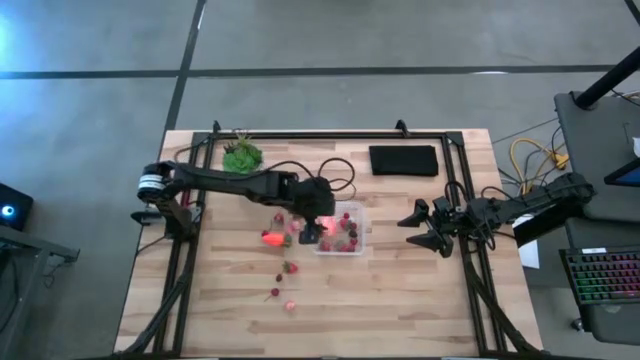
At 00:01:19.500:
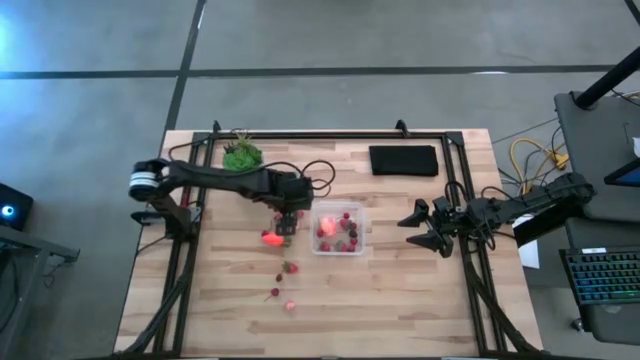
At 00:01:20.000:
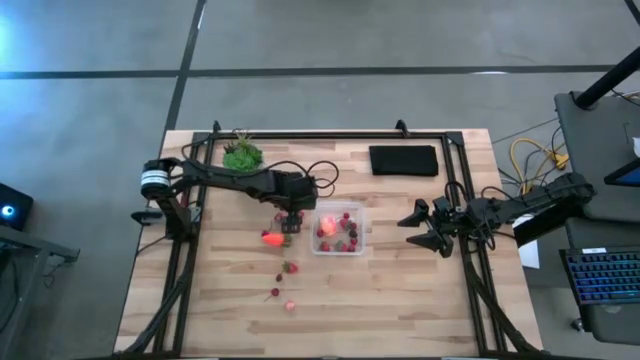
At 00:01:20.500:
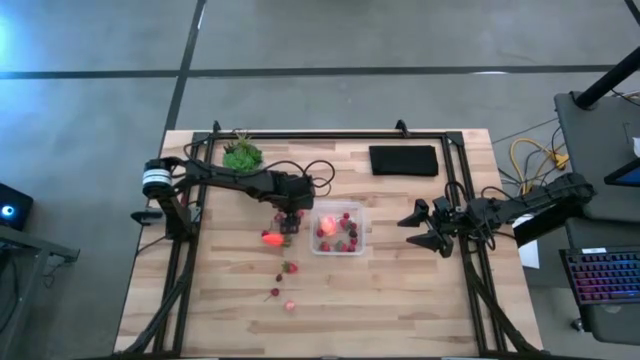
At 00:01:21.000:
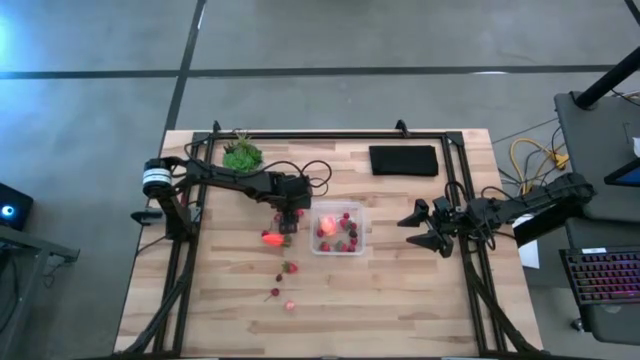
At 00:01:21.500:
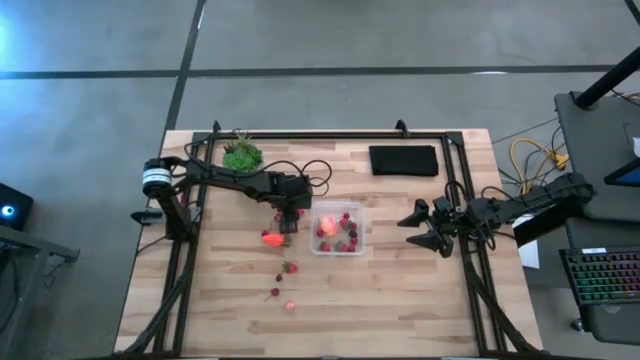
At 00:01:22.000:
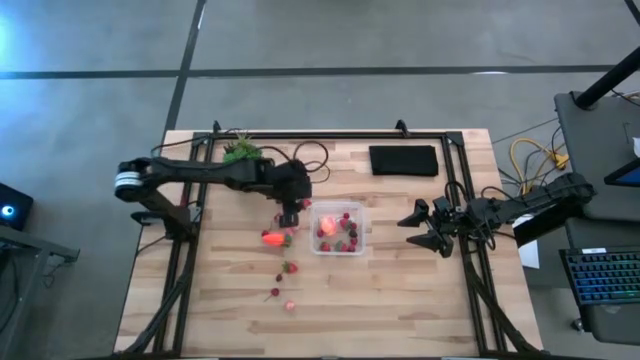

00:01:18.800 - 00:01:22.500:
Task: Pick and placing Produce into tupperware
Put the strawberry into the transparent container

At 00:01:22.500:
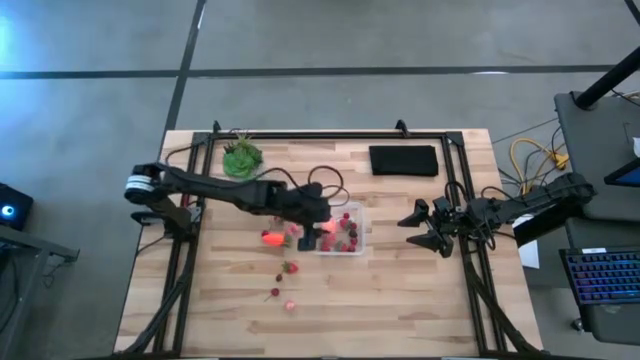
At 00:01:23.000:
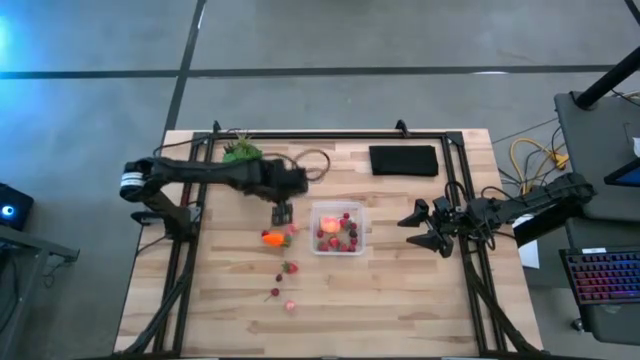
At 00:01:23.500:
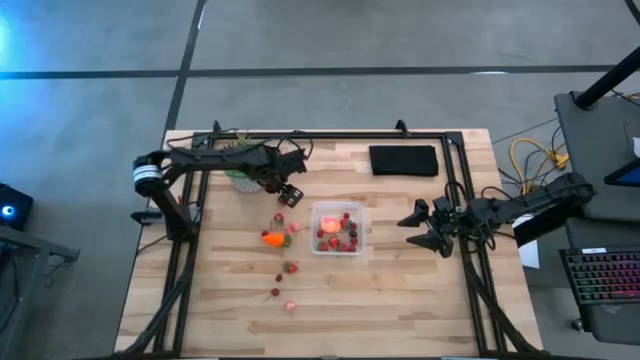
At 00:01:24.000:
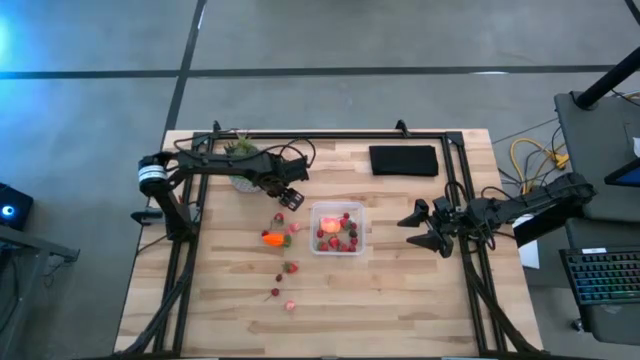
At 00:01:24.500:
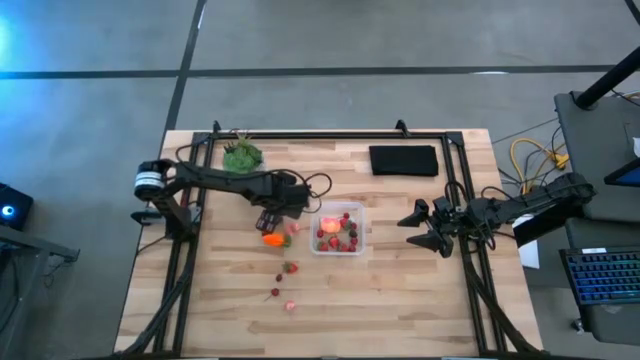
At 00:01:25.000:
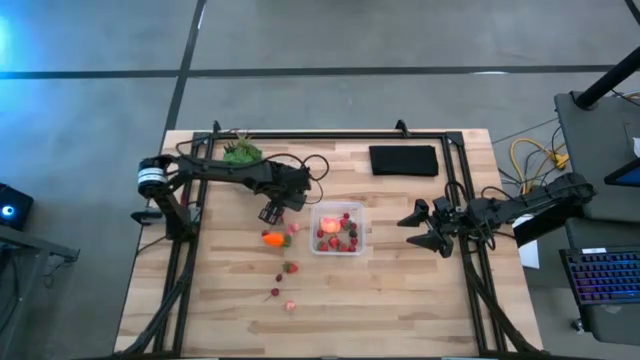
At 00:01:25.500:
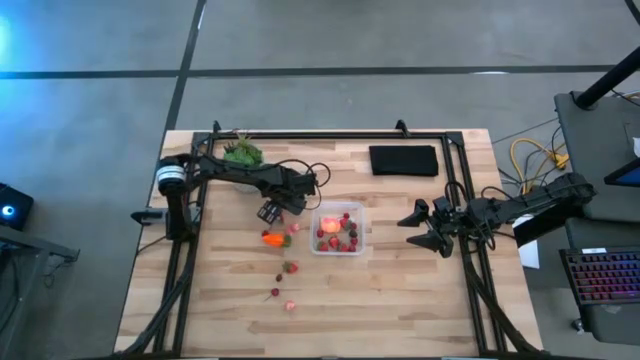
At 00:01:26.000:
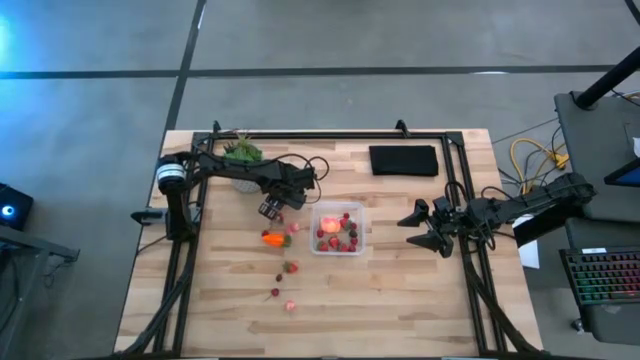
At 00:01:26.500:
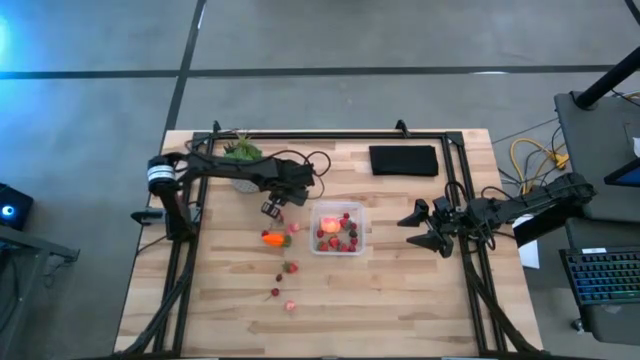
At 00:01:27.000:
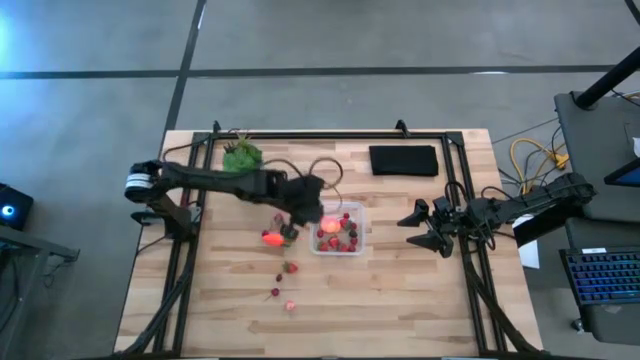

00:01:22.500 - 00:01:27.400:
Put the strawberry into the transparent container

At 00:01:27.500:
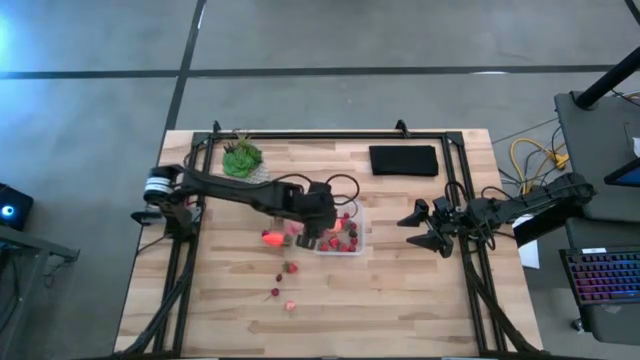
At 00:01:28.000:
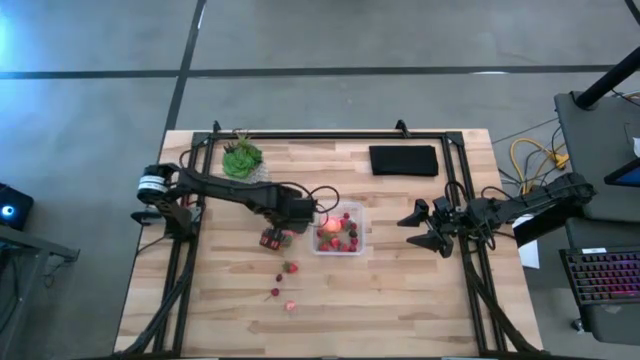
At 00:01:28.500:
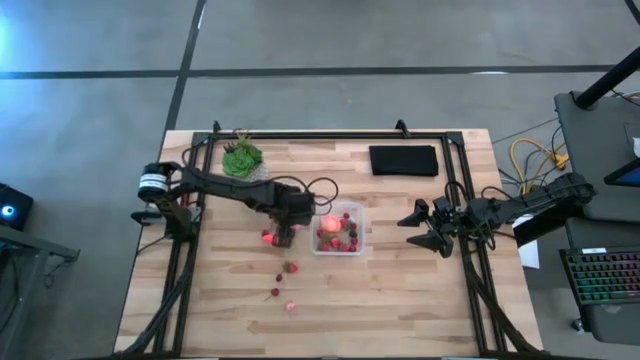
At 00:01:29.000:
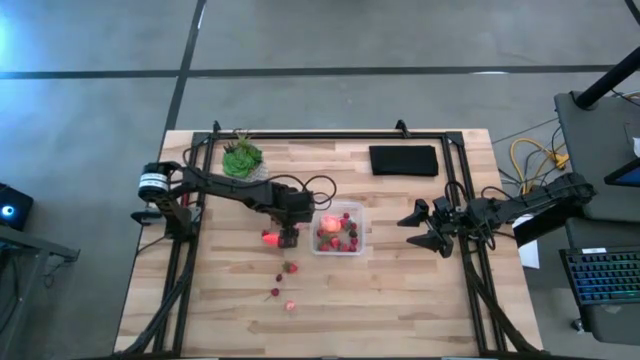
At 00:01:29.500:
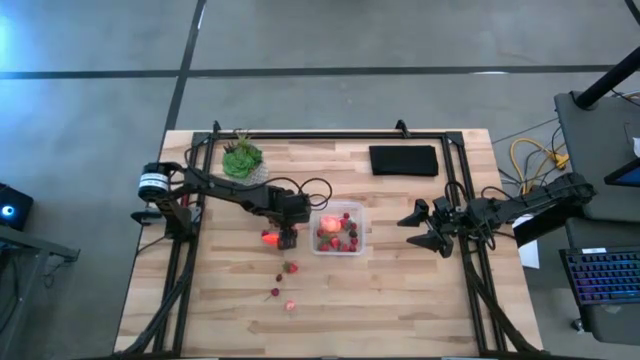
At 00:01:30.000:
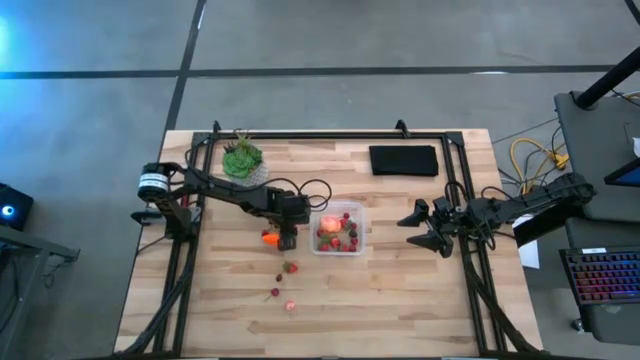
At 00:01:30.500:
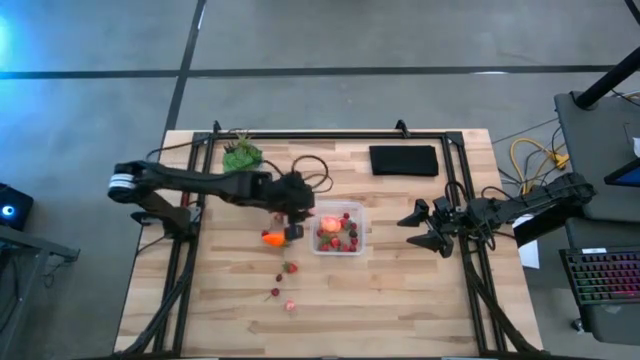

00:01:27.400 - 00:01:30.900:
Put the right small peach into the transparent container

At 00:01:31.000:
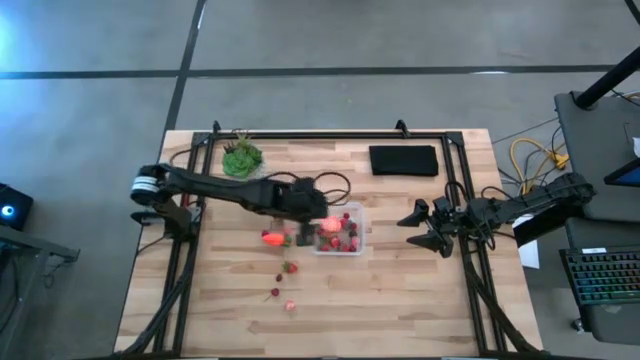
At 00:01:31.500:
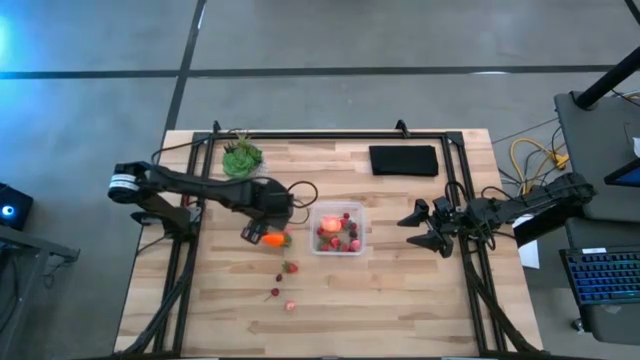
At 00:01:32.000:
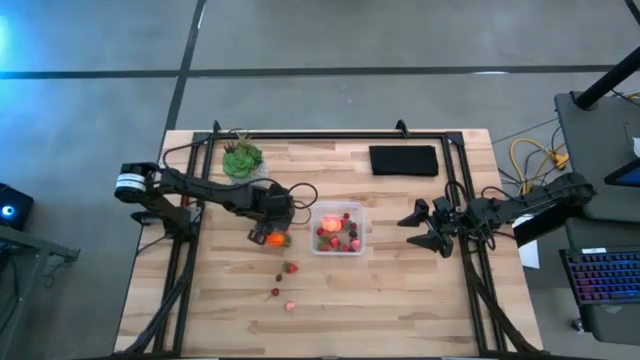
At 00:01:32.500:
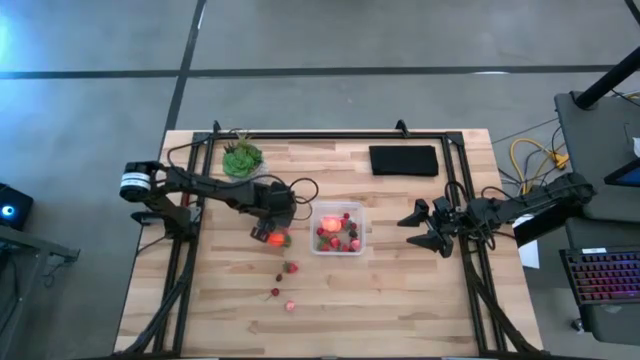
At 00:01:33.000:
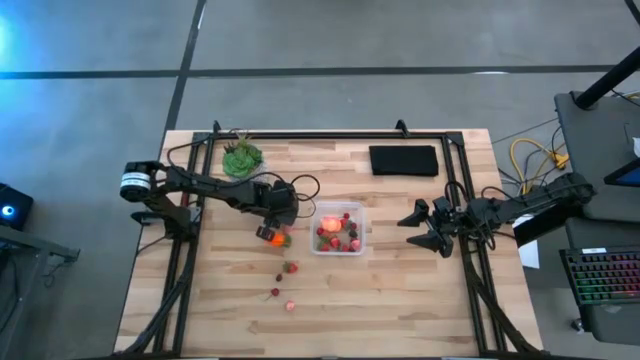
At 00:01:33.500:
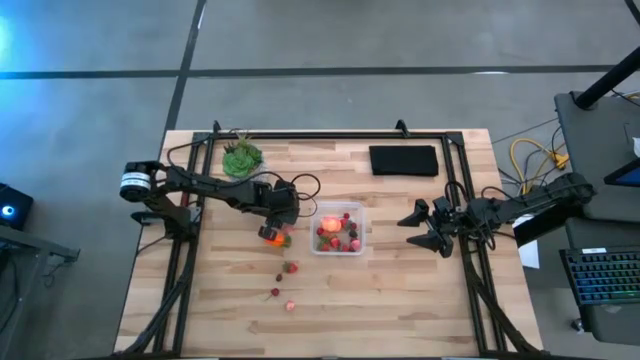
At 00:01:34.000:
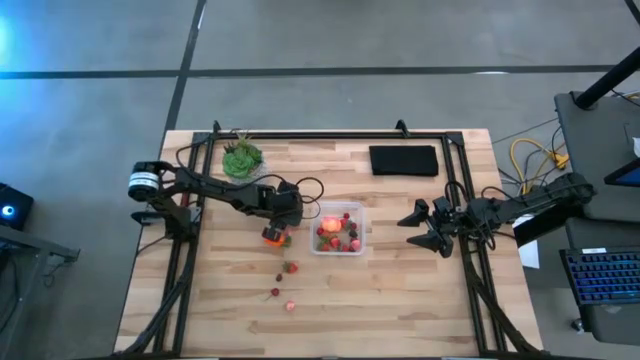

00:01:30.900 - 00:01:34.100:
Put the strawberry into the transparent container

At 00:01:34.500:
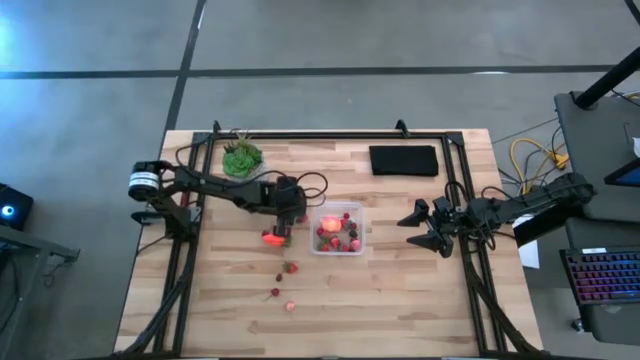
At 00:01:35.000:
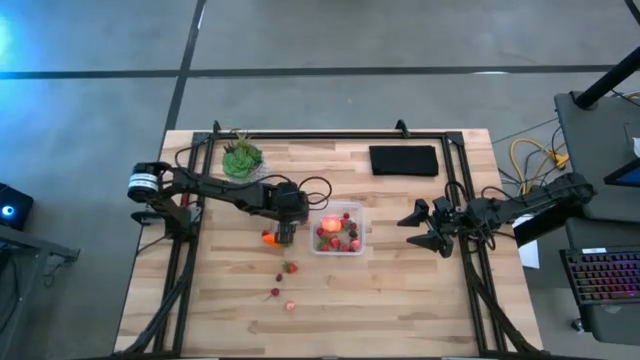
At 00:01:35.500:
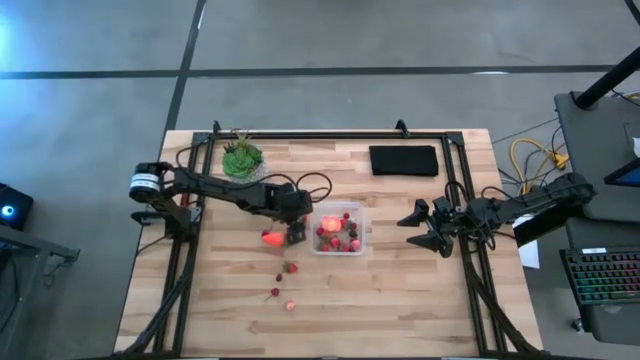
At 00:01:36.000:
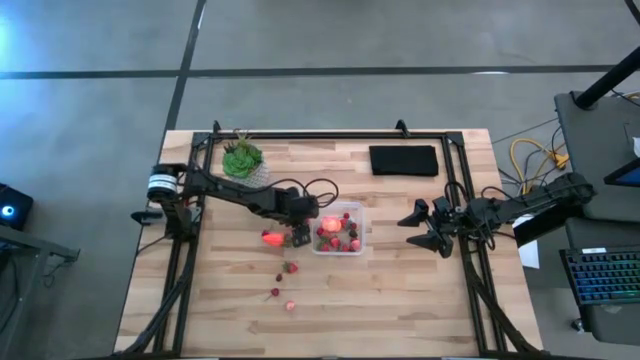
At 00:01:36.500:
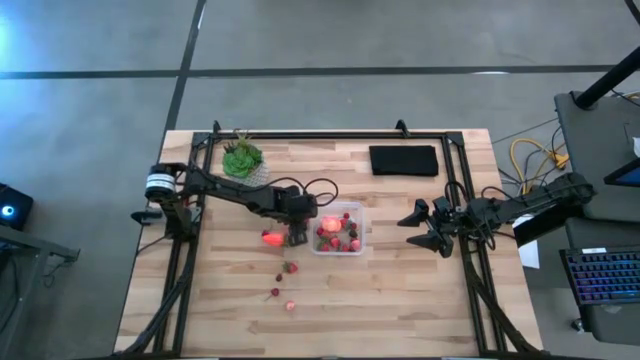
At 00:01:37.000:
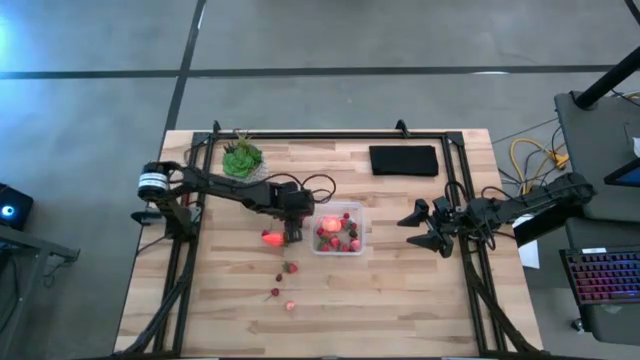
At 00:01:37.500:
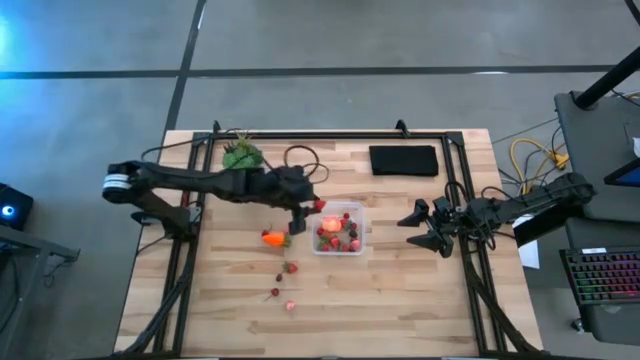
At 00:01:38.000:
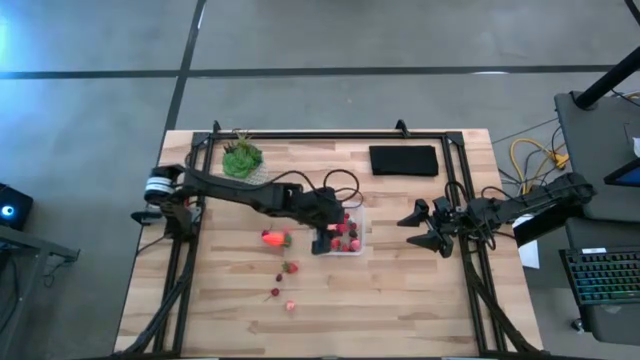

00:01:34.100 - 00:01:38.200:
Put the strawberry into the transparent container

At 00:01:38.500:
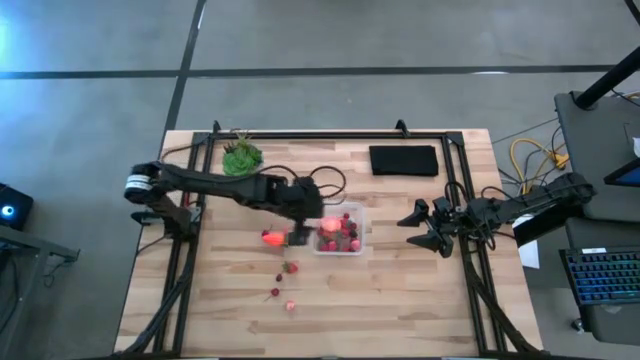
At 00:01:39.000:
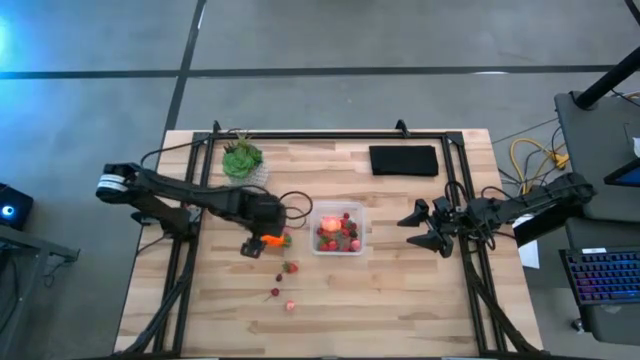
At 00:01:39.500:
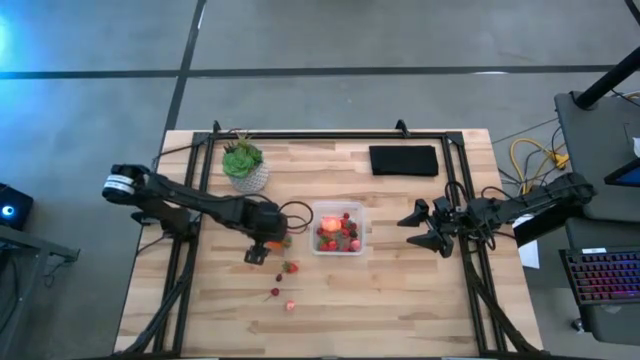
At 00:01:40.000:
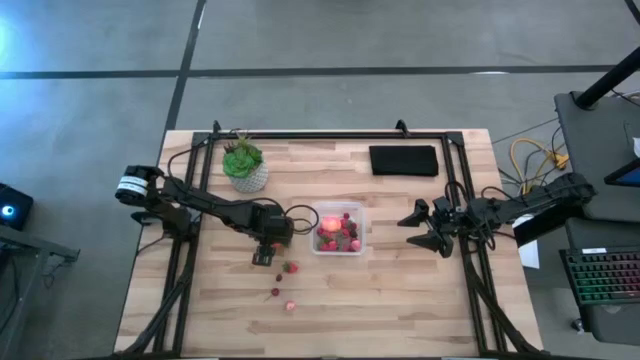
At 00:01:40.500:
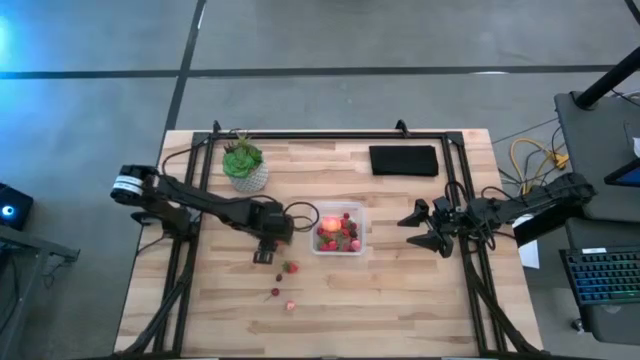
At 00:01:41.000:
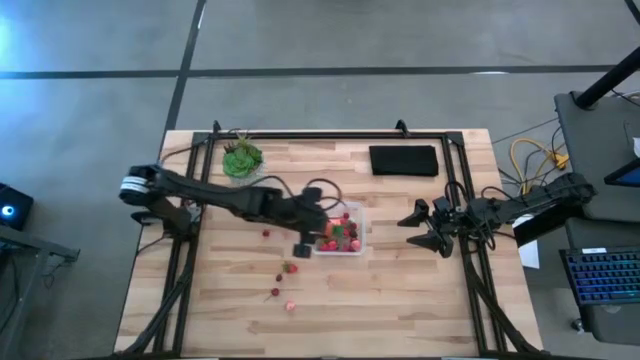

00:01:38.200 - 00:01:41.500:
Put the carrot into the transparent container
